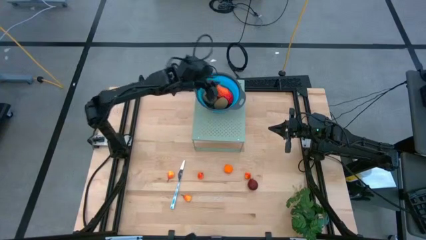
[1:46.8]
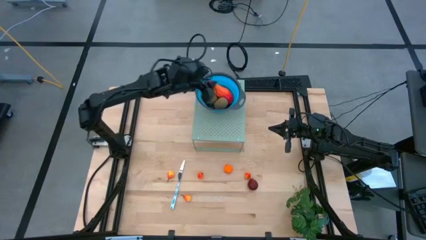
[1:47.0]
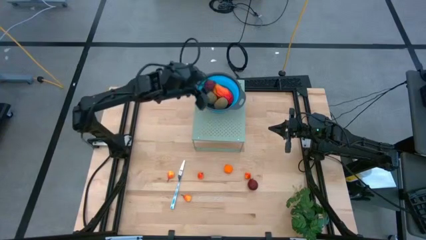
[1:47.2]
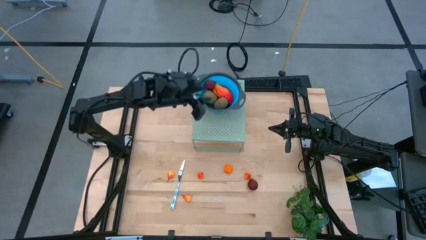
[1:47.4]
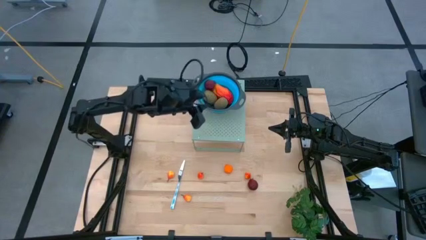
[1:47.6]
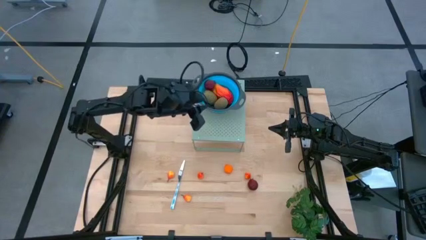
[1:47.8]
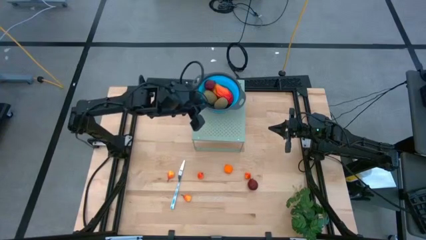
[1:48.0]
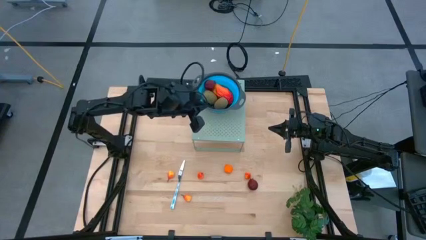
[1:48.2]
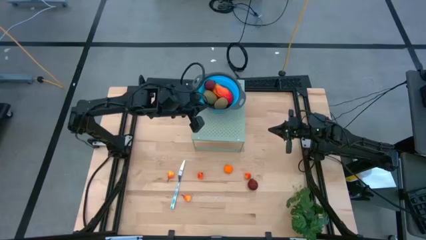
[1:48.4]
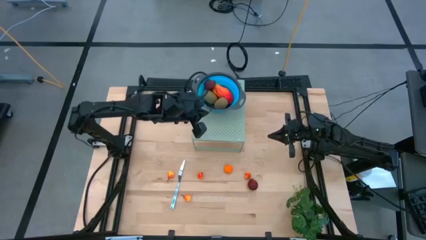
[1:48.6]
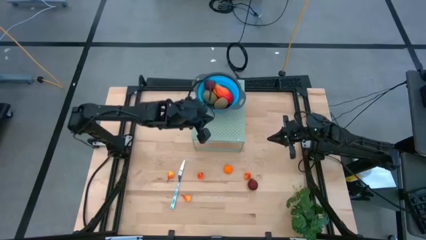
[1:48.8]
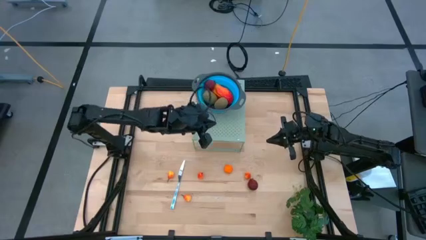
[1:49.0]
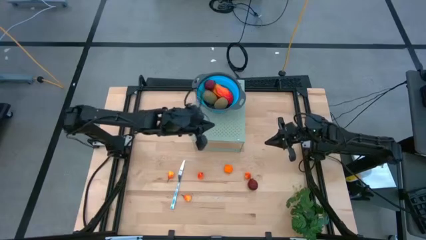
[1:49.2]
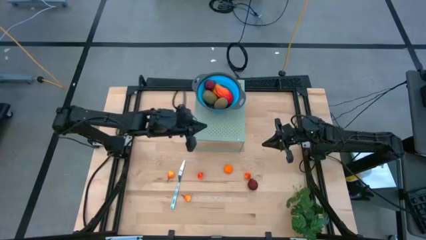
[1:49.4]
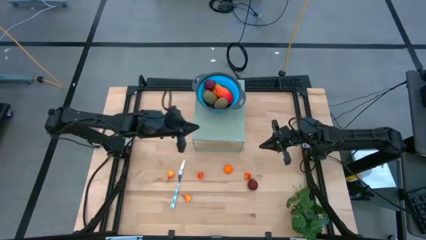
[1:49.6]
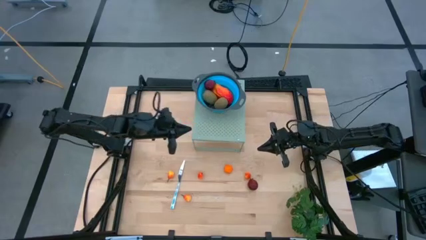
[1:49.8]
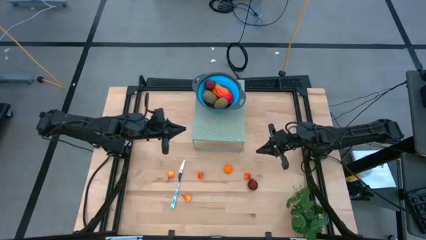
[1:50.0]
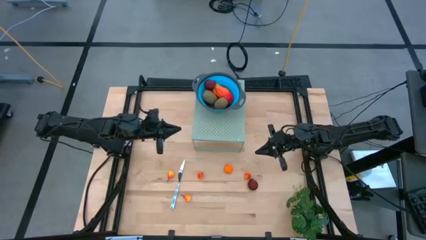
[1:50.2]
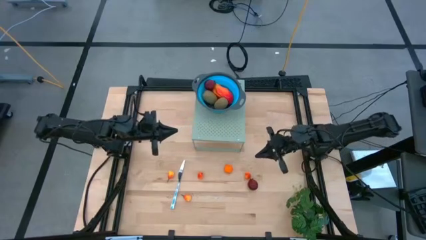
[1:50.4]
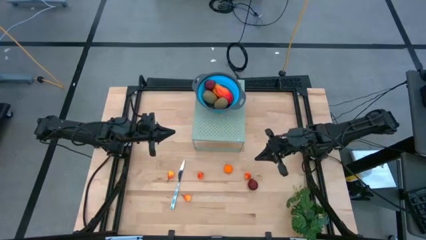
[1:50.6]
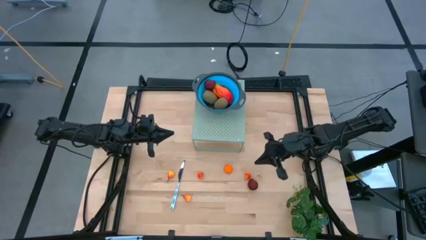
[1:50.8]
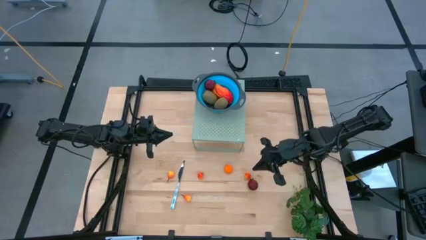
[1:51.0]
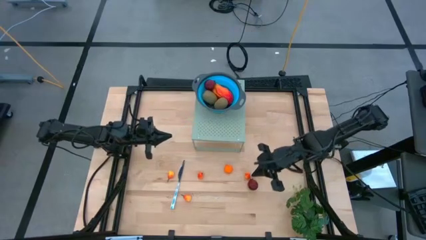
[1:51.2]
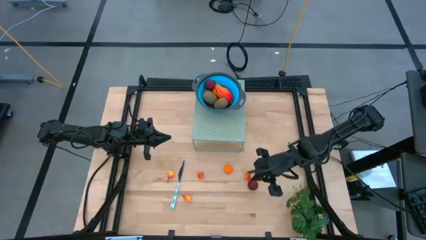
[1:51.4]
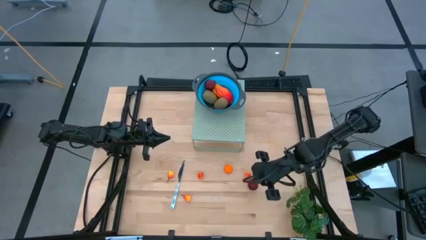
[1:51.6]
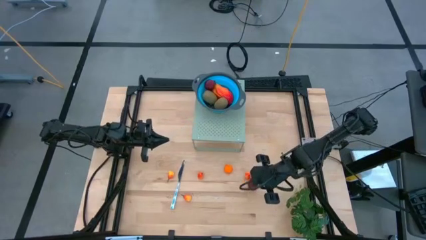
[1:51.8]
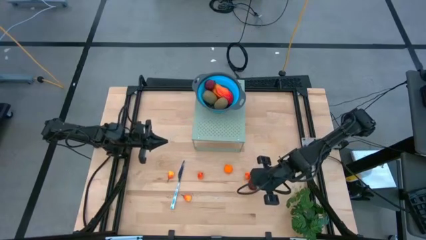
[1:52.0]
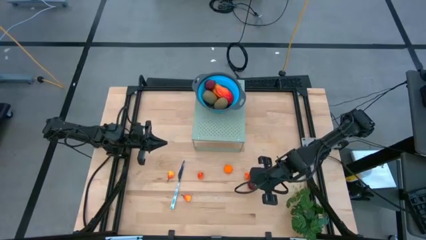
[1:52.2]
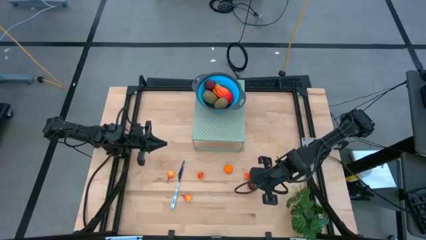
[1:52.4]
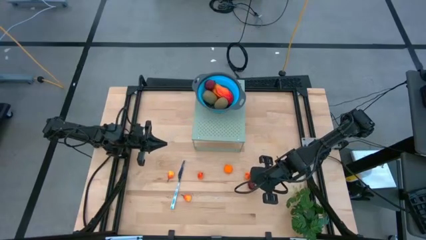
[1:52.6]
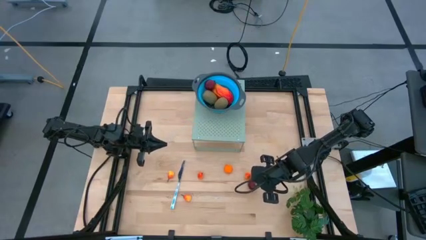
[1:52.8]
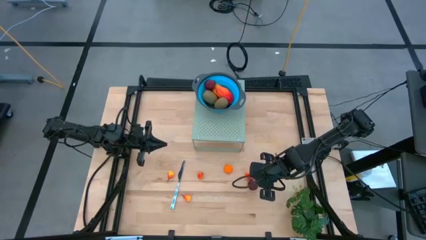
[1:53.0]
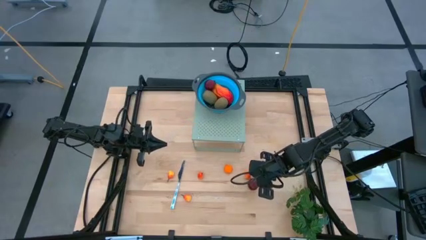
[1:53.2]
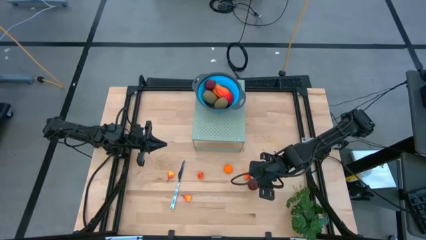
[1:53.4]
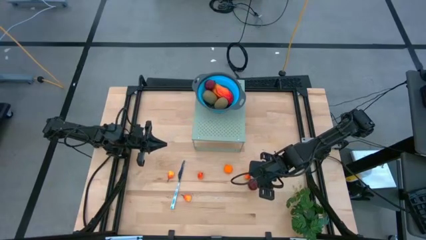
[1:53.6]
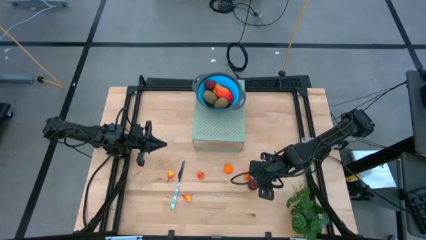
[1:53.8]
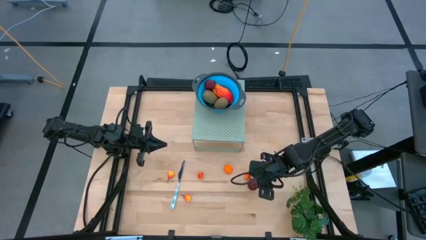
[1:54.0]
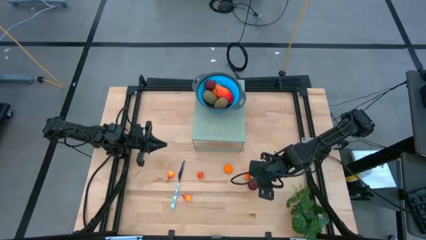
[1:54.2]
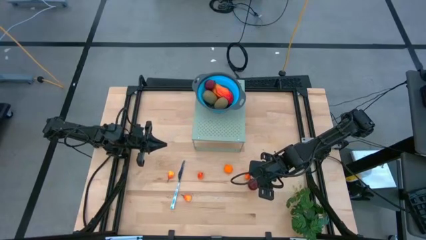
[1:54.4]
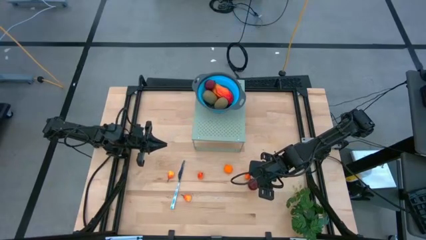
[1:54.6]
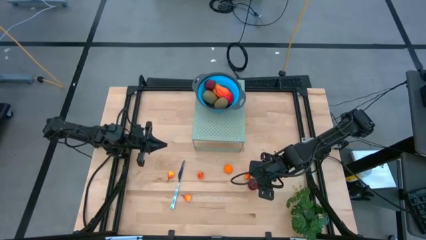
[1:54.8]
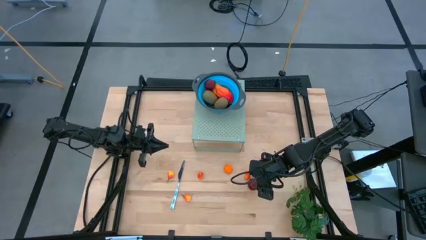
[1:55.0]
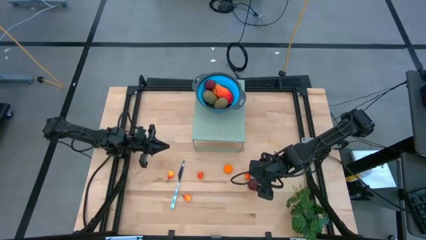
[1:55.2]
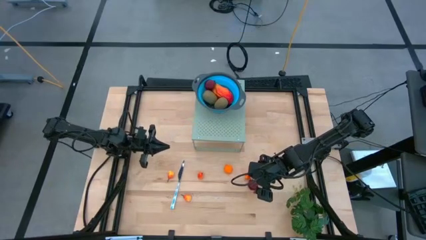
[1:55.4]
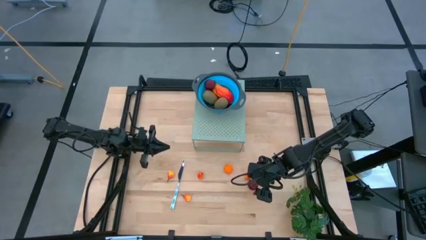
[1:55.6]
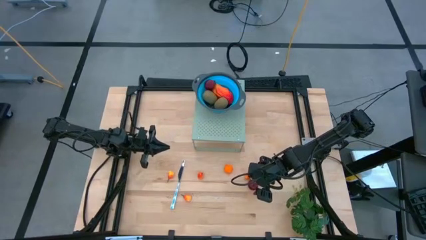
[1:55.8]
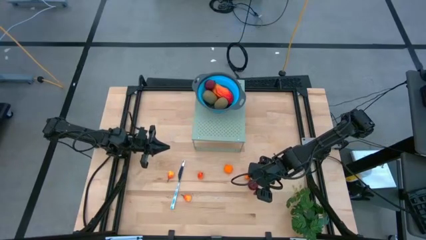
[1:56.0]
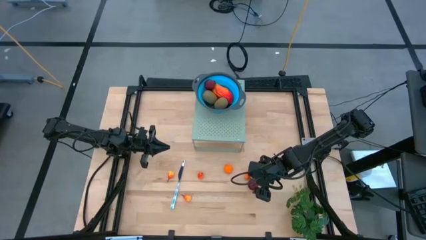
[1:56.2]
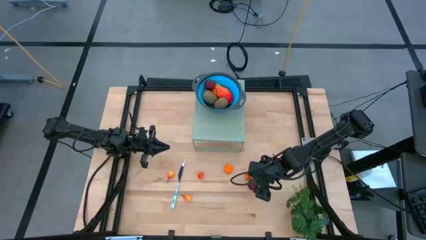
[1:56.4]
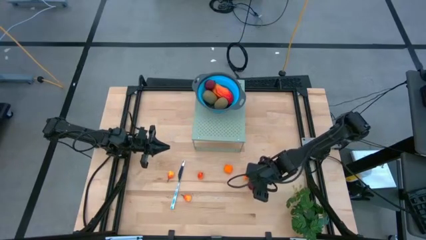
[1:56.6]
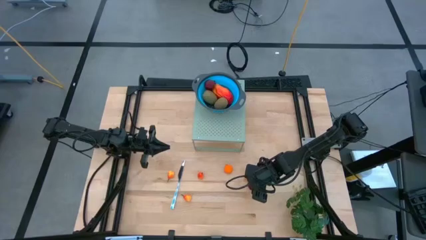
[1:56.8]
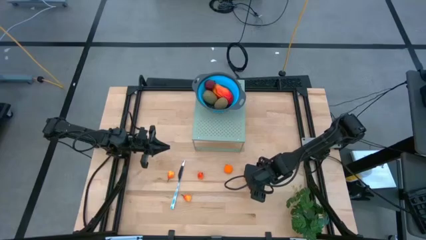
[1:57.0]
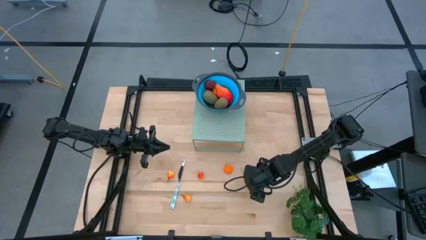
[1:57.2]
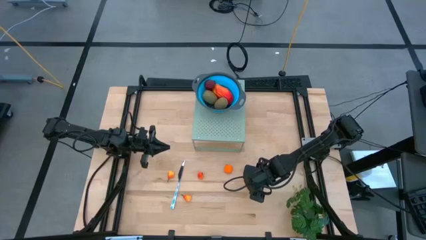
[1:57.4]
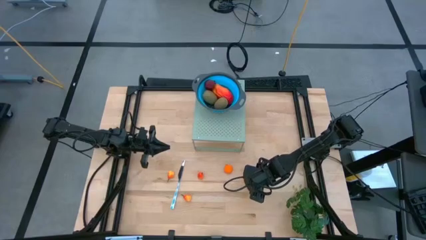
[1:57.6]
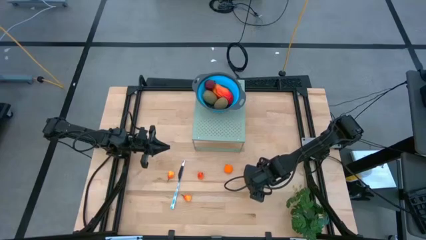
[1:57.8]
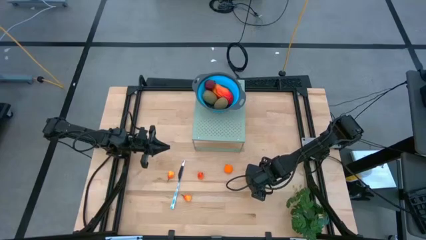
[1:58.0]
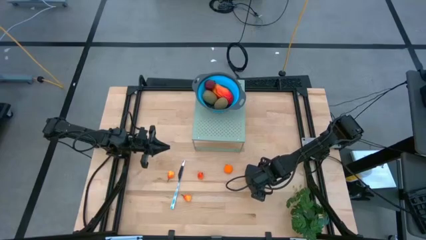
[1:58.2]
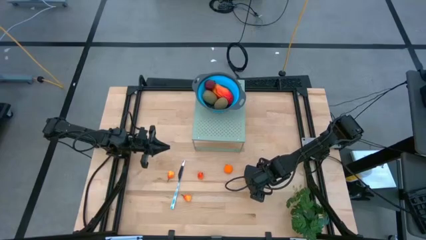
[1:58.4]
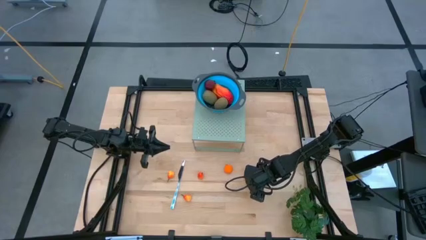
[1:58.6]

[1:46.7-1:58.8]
Task: Pick & Place Fruit
Put the pomegranate into the blue strainer bowl on the shelf

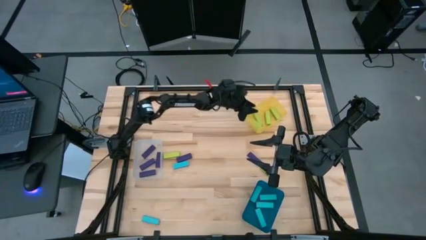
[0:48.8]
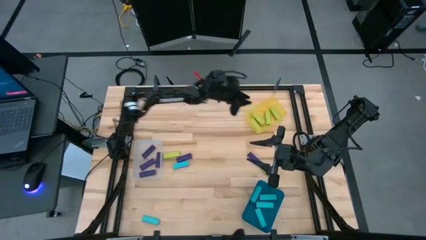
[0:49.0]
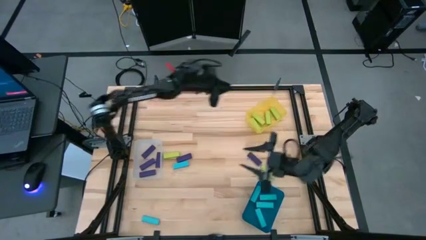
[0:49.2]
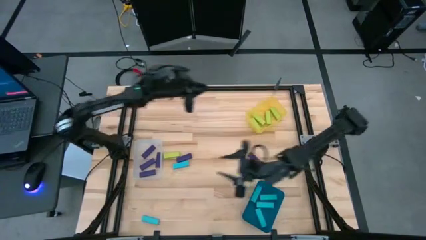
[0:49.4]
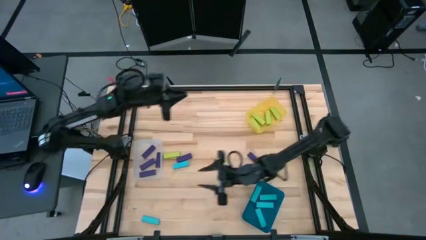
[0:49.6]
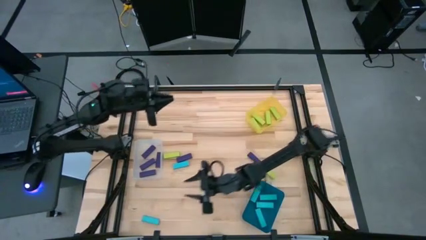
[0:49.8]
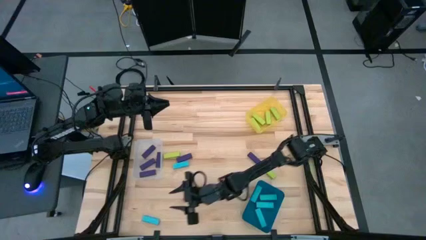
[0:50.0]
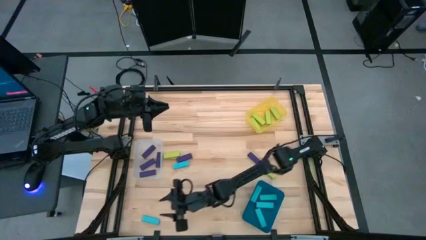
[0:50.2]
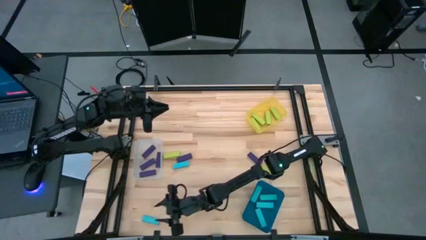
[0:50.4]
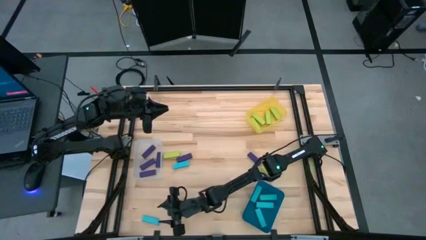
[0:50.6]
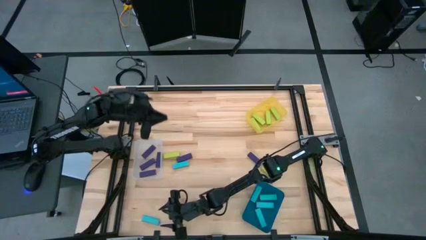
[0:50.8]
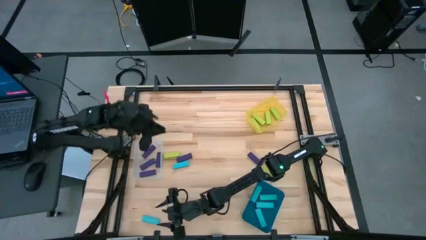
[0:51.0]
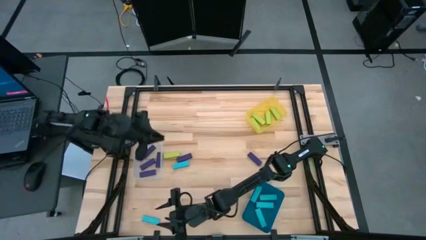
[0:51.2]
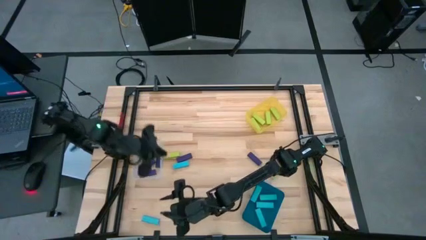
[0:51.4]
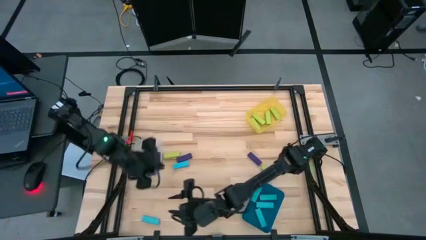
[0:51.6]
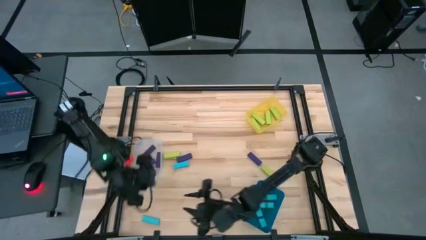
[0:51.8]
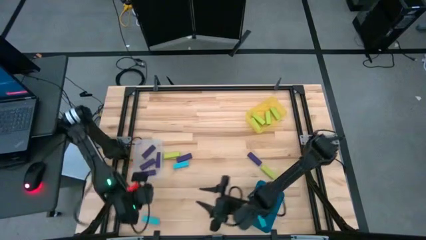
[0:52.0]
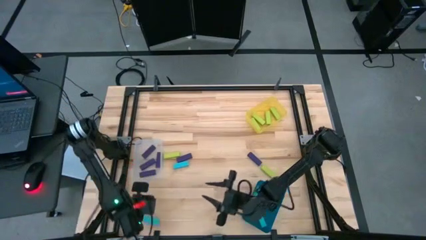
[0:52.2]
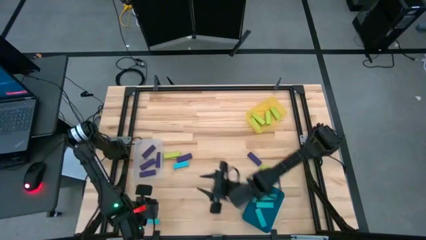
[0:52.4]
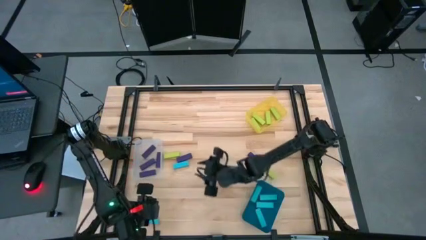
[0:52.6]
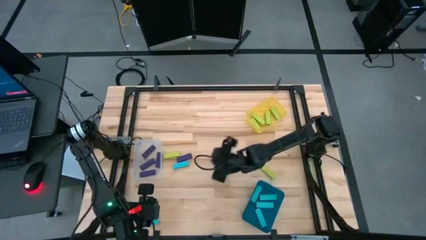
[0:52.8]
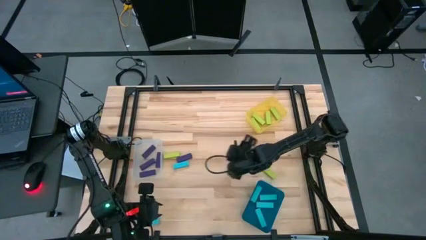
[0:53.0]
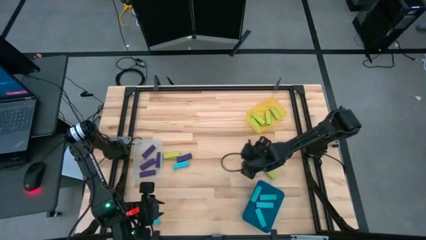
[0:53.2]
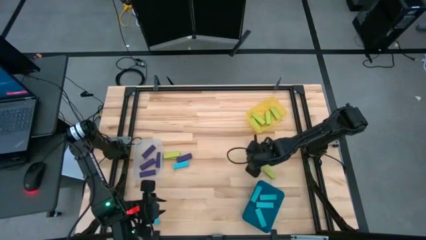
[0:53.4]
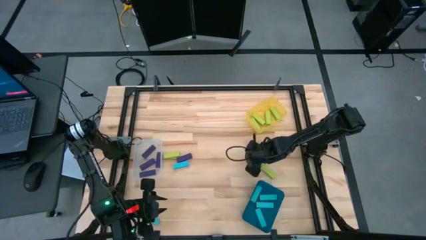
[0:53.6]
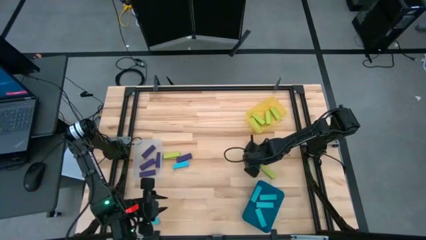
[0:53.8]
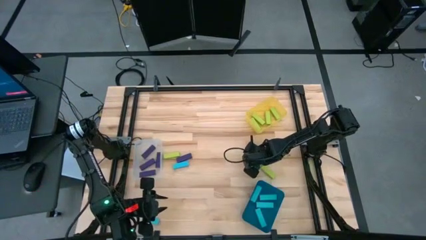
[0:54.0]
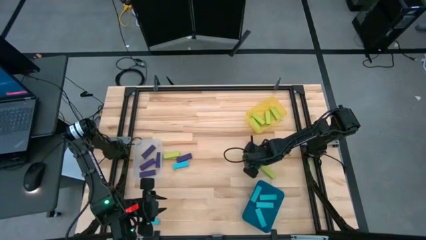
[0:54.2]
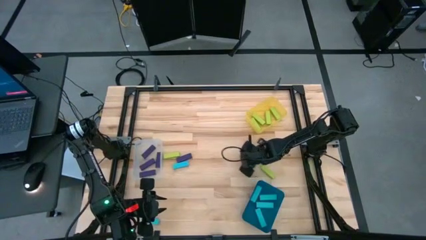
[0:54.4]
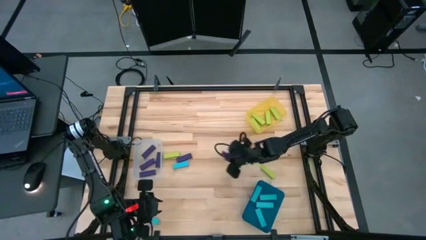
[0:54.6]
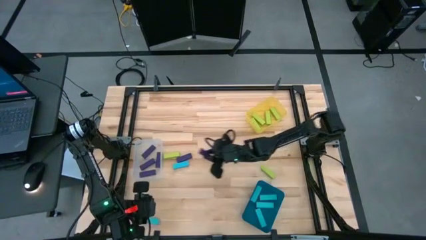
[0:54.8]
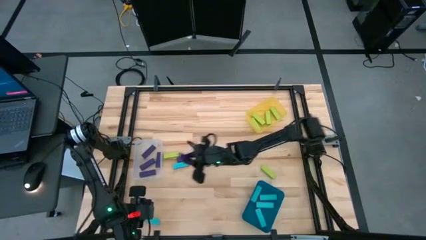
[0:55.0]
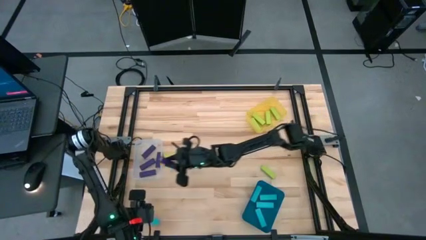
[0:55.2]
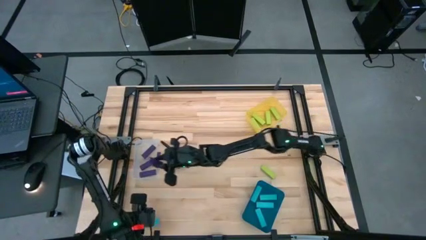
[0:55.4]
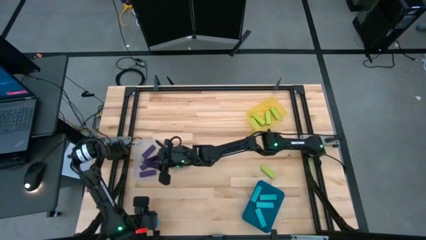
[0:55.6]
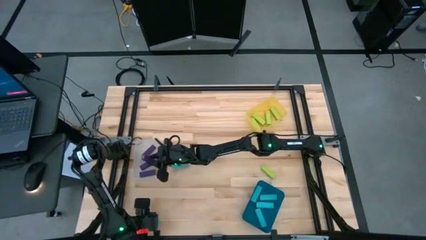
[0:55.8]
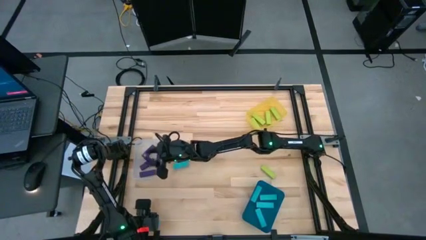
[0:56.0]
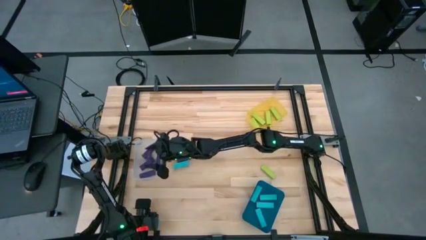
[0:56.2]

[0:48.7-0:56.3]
Task: Sort blocks
Put the violet block into the transparent bin
